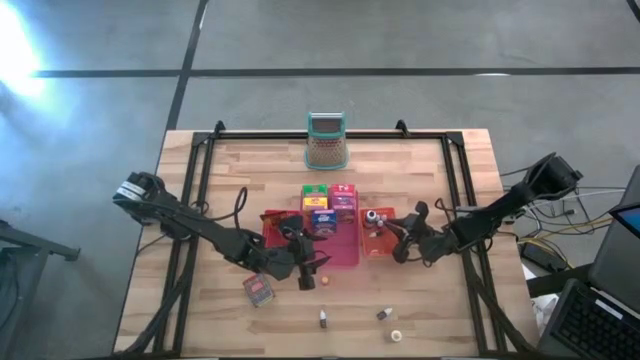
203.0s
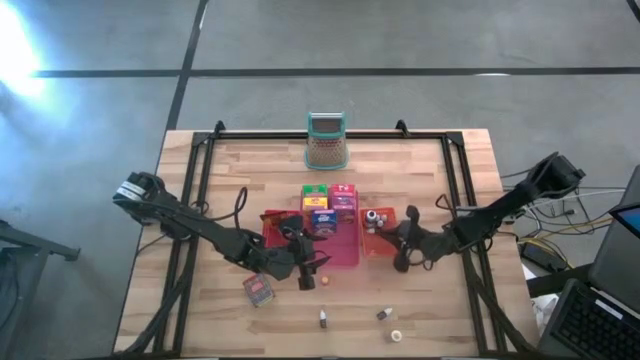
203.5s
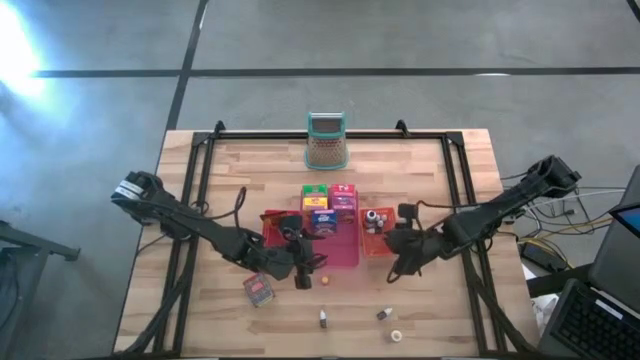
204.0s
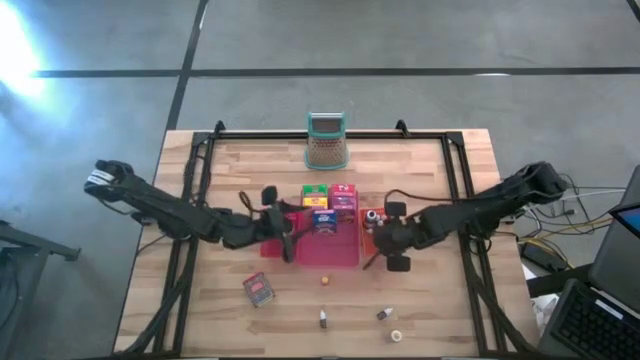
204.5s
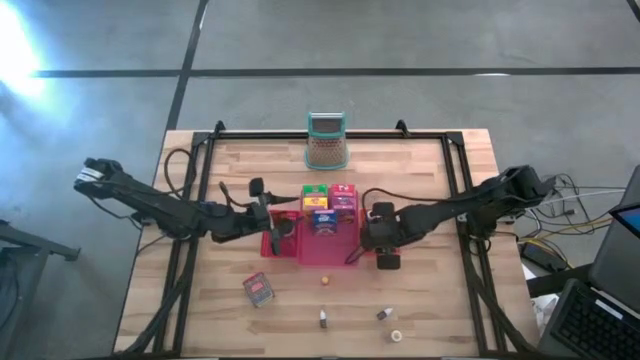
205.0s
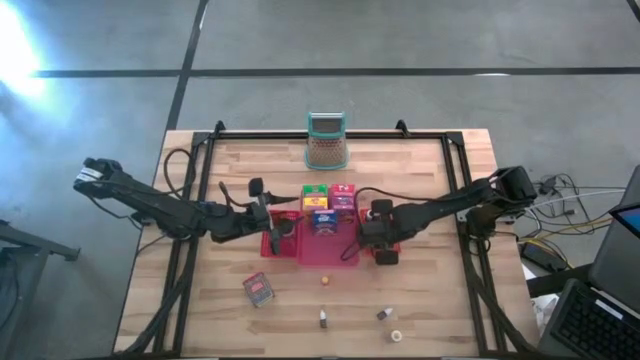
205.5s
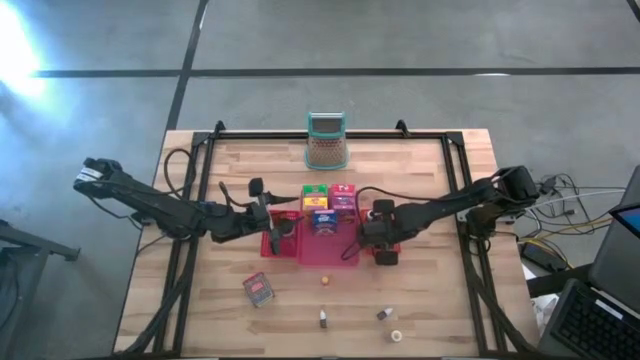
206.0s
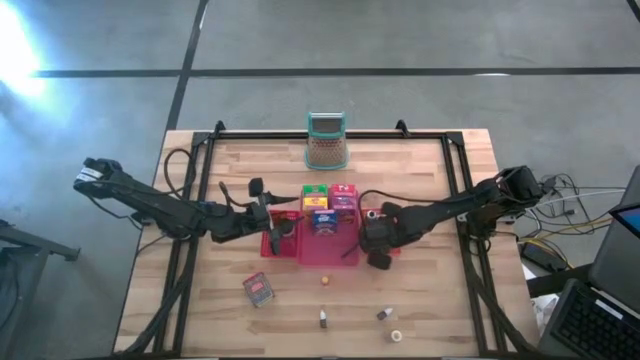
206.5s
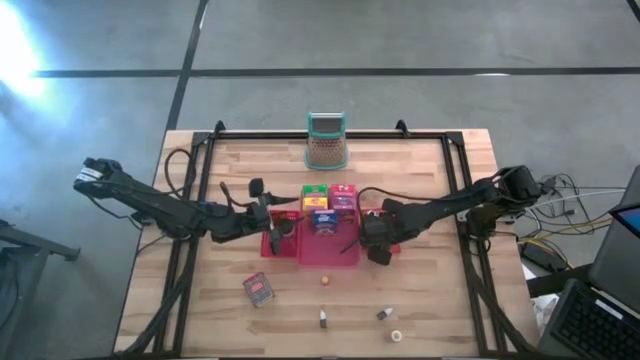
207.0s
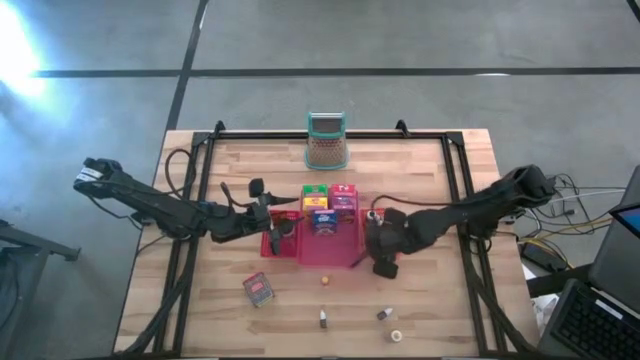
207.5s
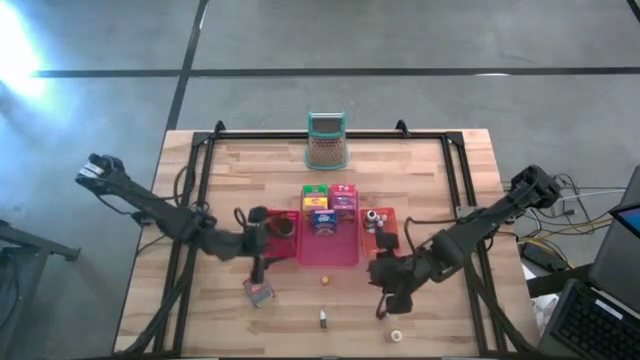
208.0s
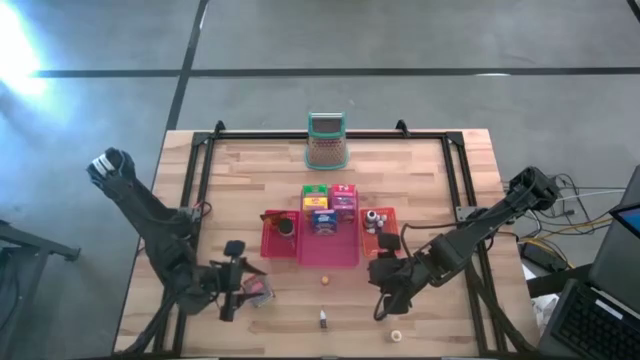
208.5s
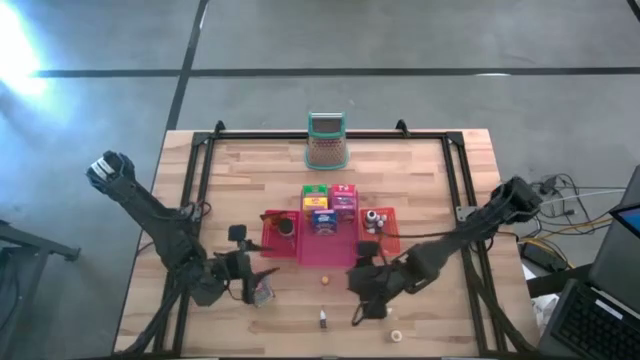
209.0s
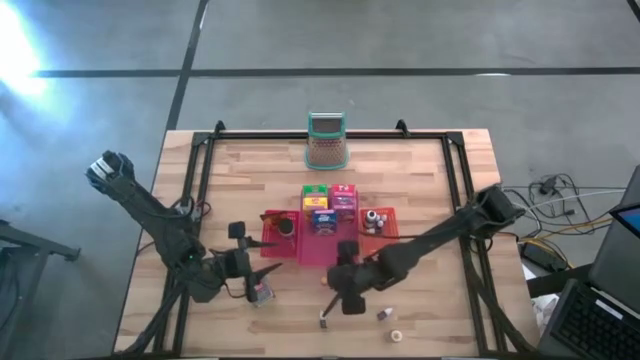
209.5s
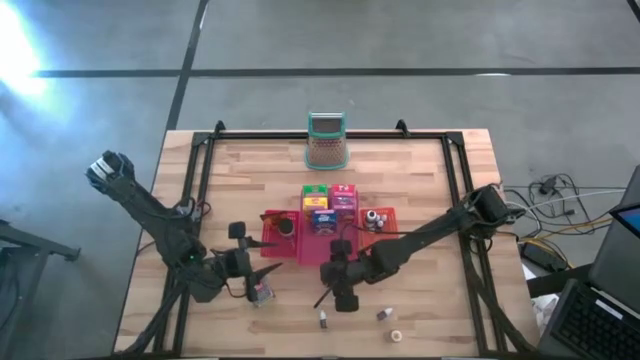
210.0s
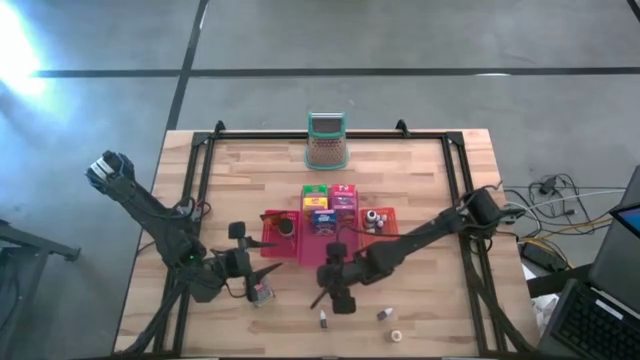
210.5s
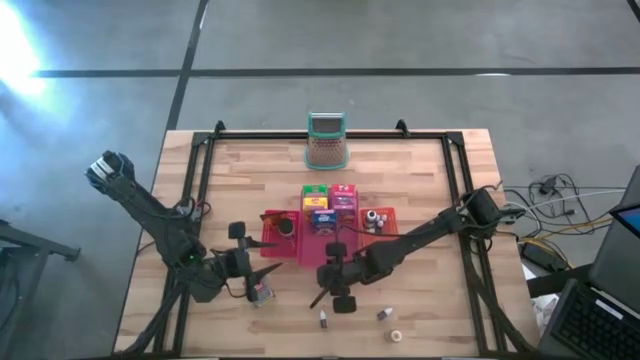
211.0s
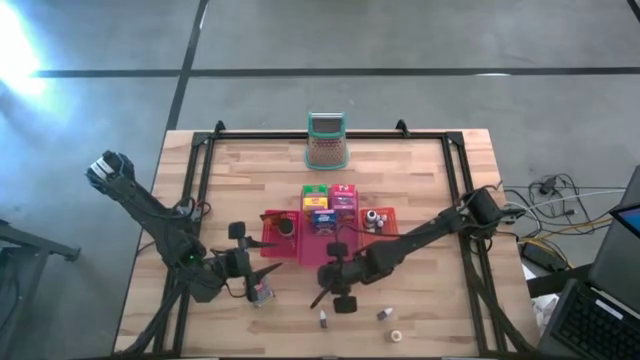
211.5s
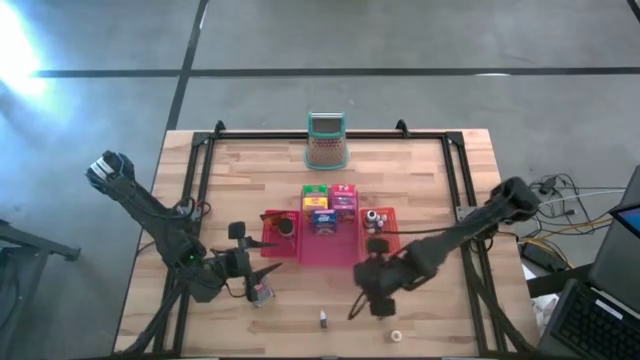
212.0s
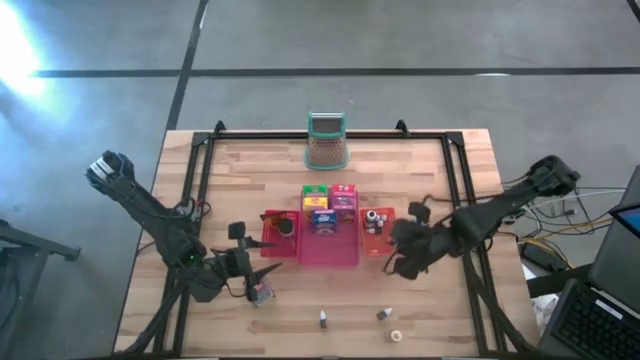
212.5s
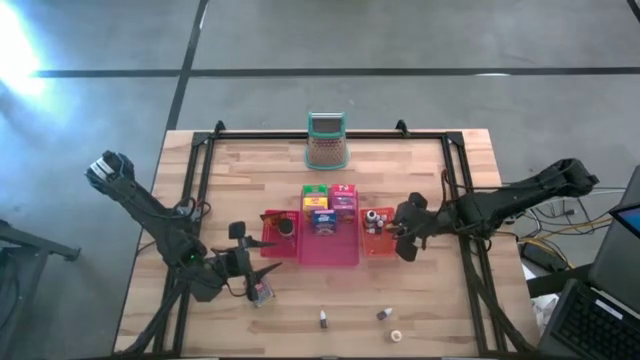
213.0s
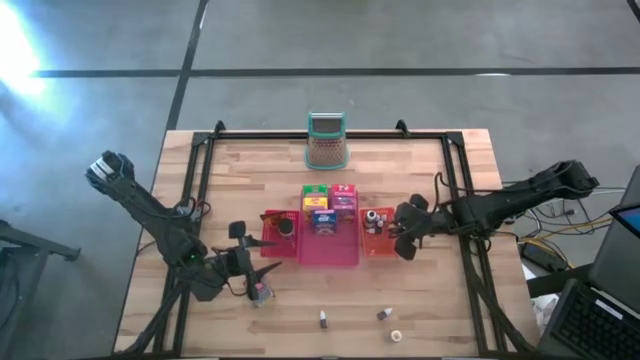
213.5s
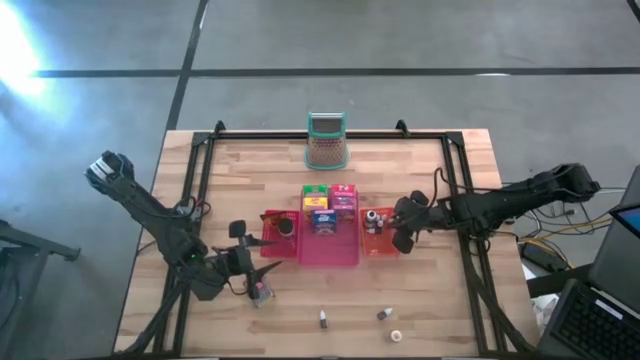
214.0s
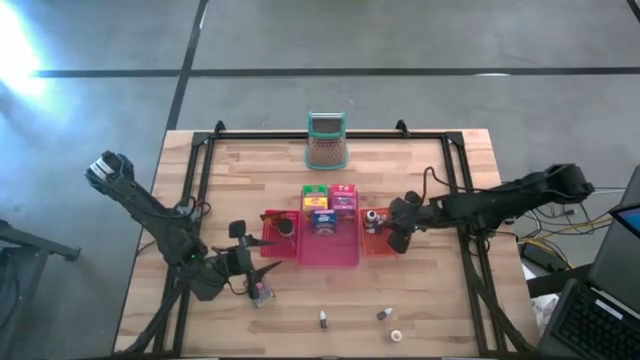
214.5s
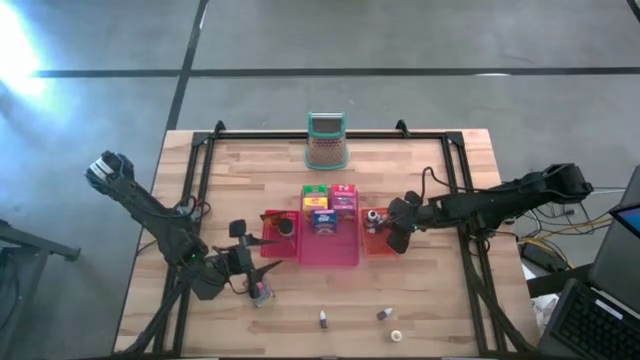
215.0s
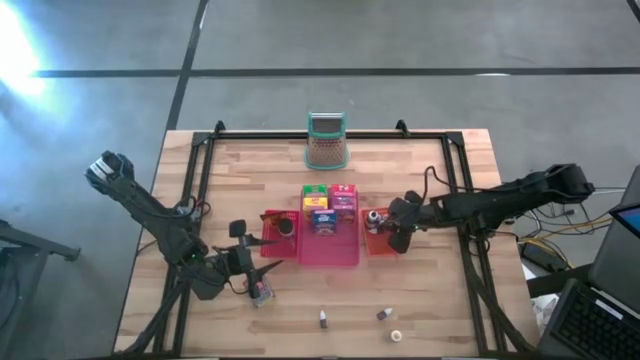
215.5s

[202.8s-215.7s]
Task: Pick & Place Kitchen Items
Put the small transparent food coloring bottle into the orange bin

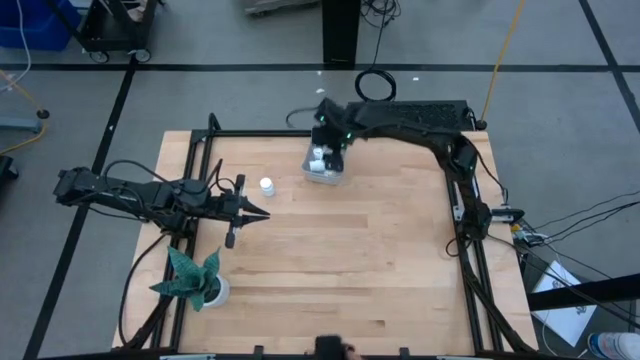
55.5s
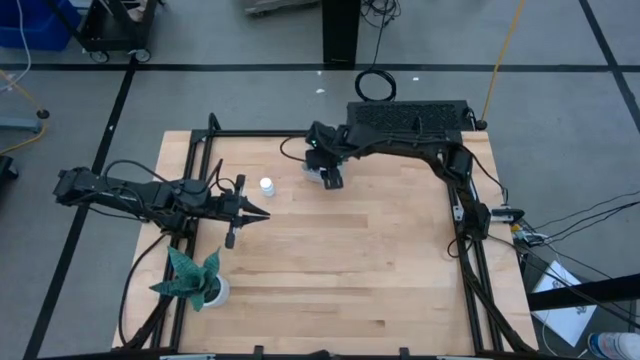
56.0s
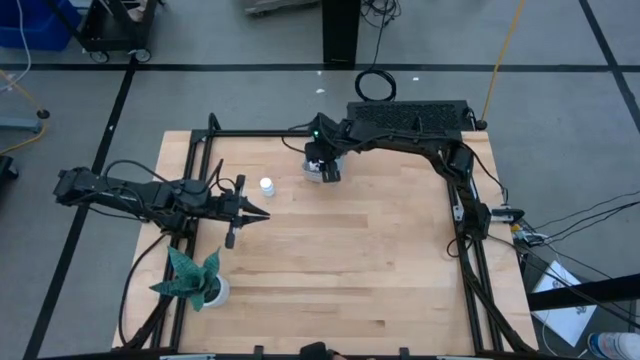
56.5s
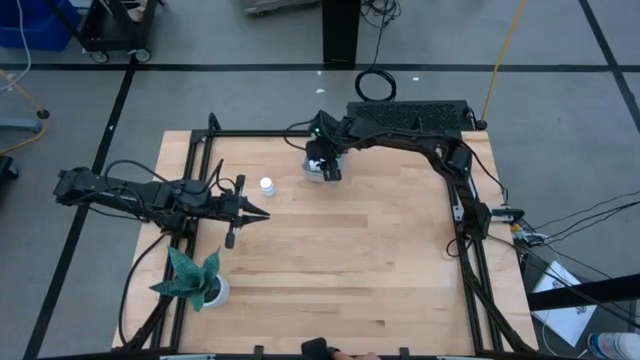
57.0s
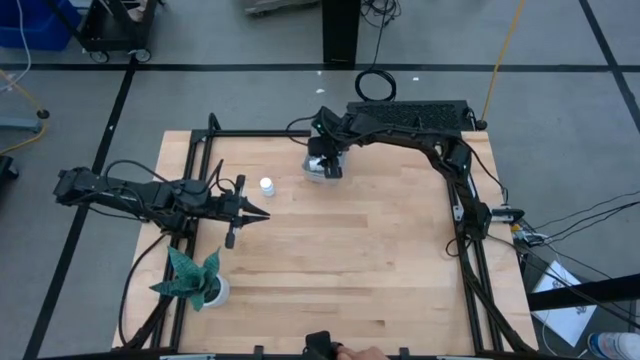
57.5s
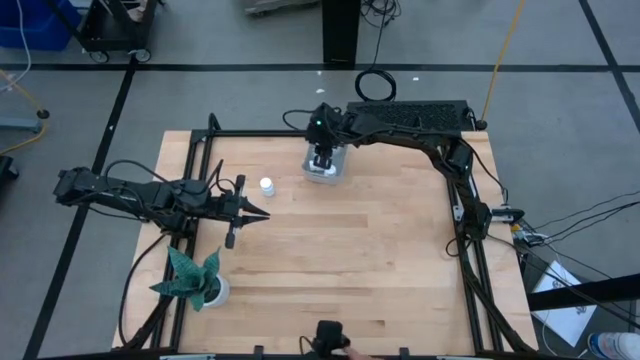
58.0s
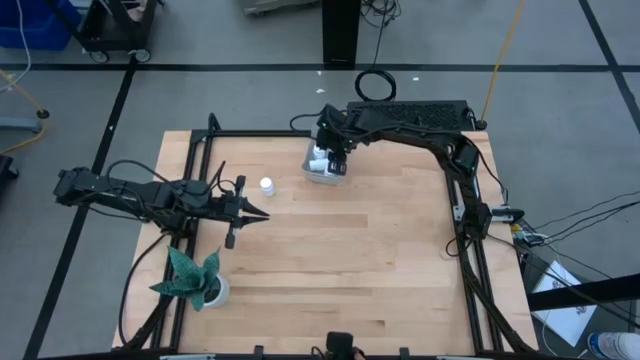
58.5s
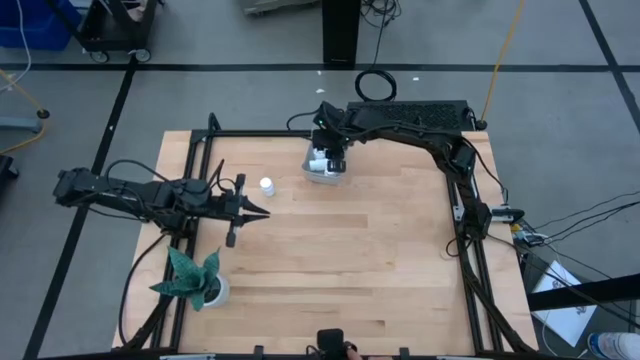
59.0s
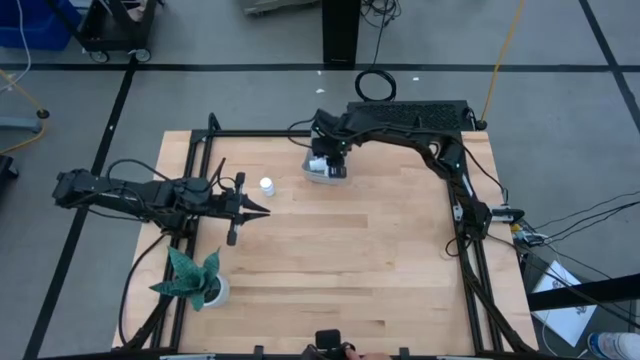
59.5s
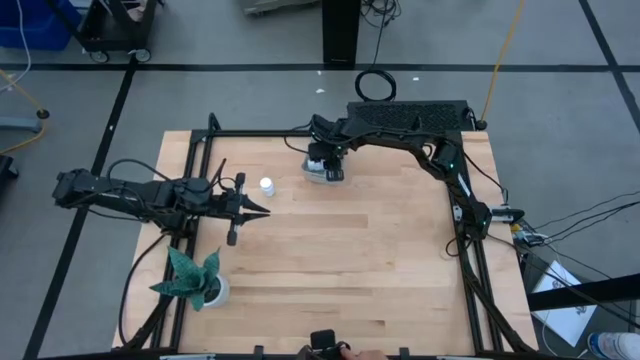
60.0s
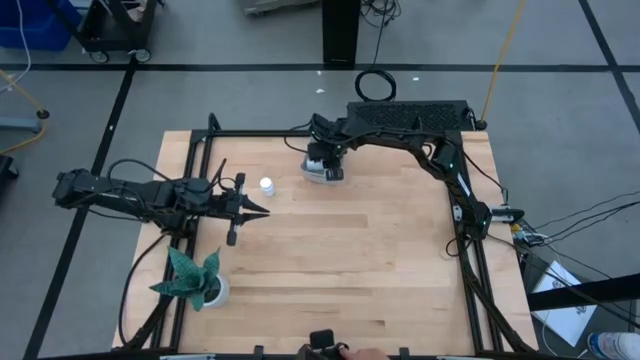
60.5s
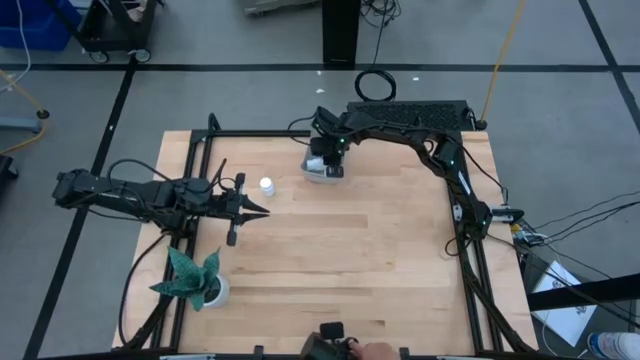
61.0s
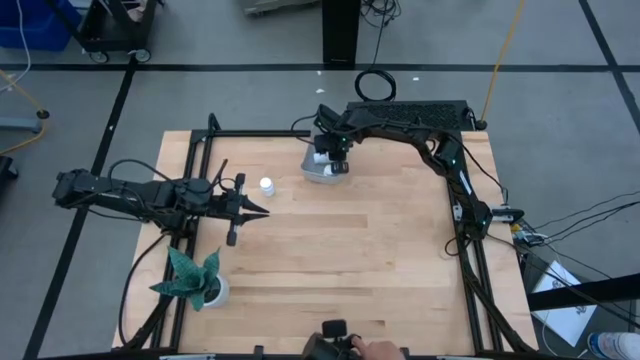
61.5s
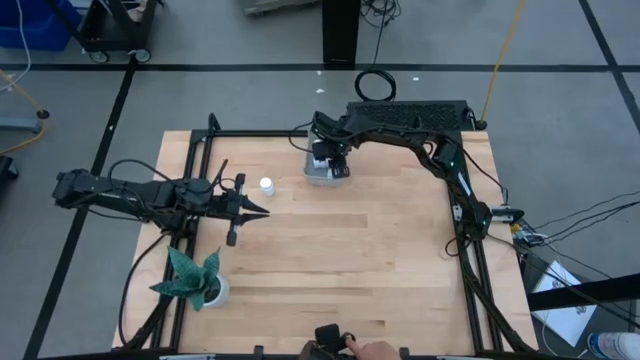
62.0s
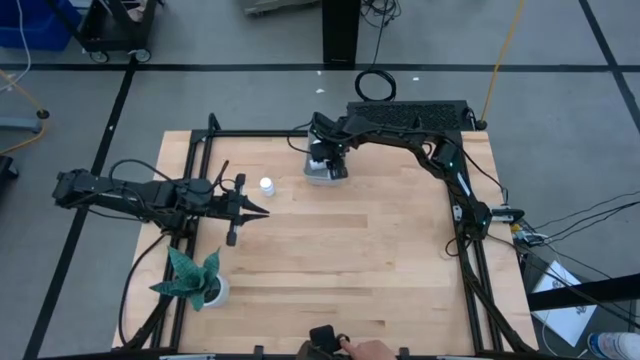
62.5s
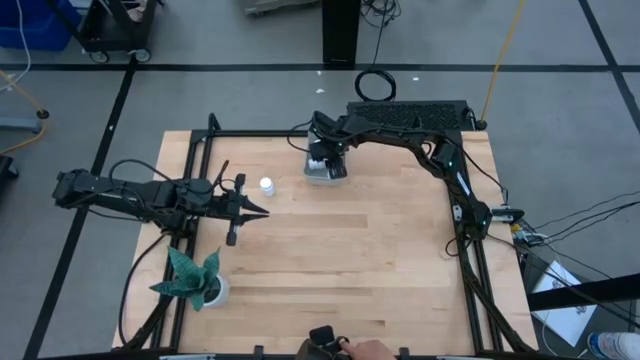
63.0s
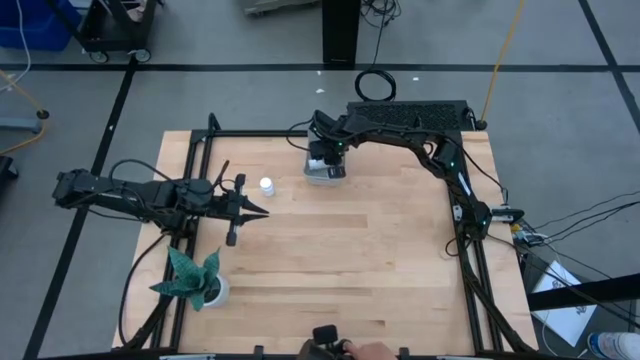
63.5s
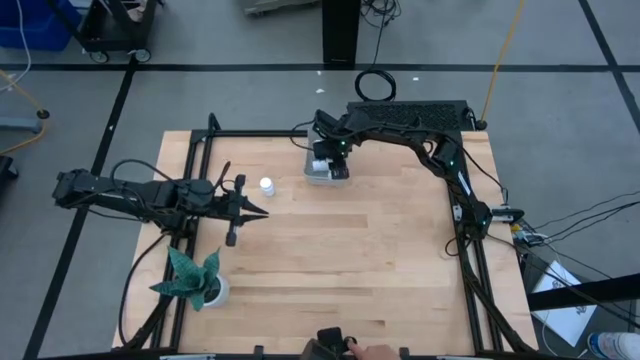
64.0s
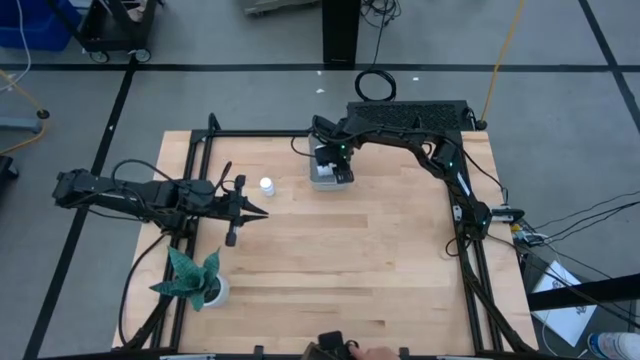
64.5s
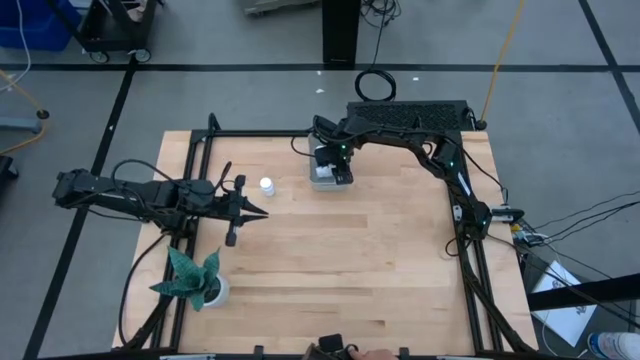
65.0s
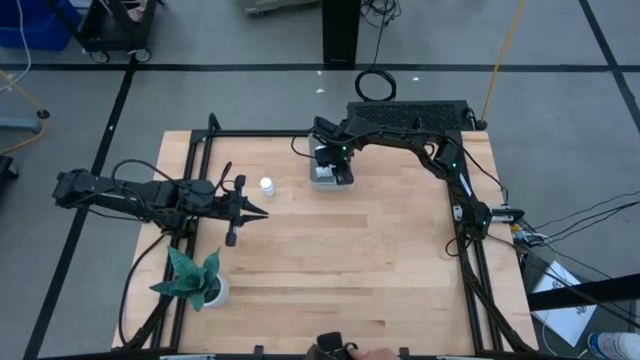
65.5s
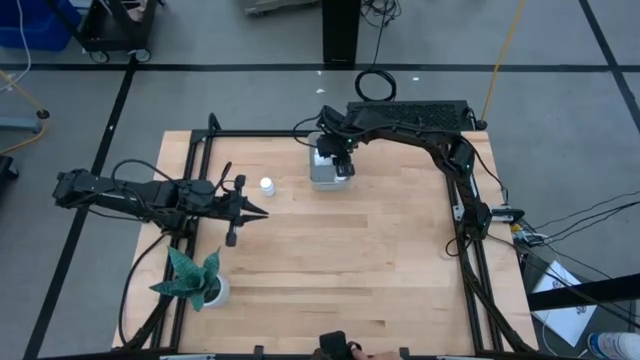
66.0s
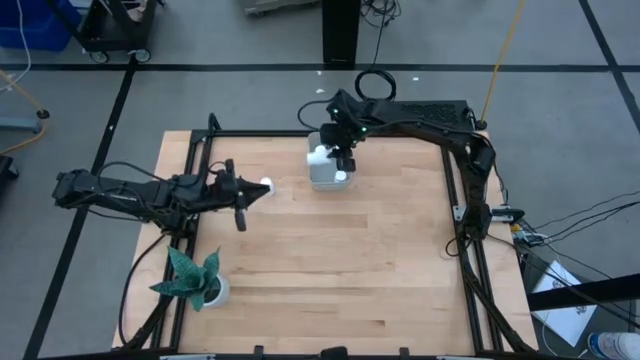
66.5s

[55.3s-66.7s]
Task: Pick and place pill bottles into a basket
Adjust the white medicine bottle on the gray bin
